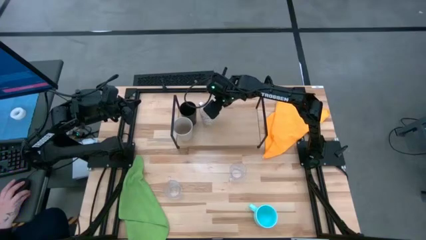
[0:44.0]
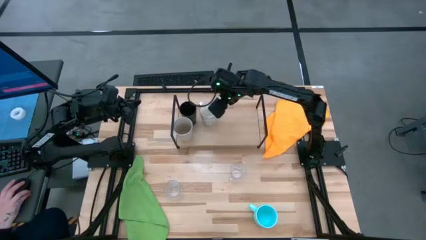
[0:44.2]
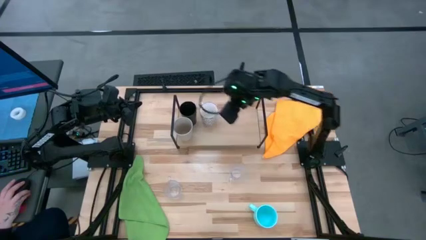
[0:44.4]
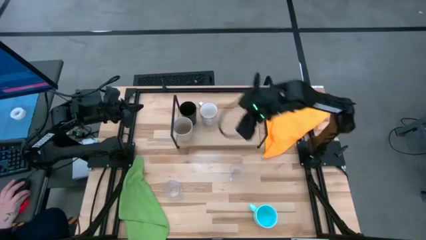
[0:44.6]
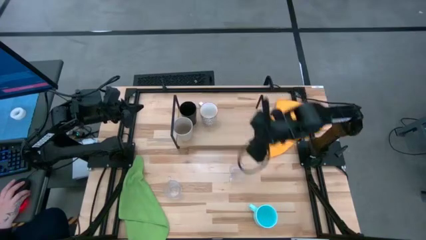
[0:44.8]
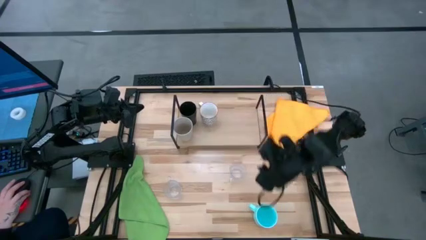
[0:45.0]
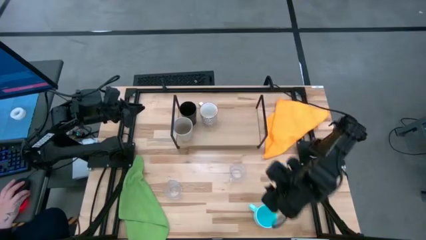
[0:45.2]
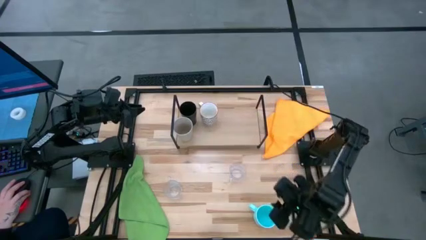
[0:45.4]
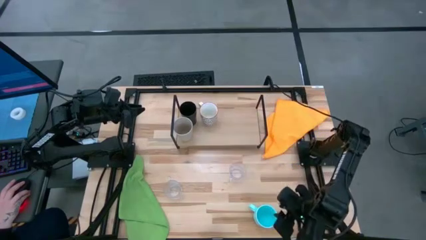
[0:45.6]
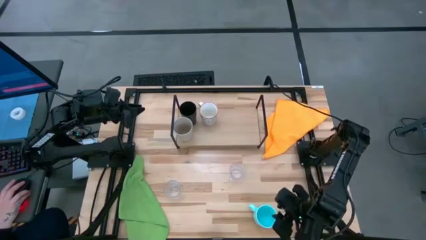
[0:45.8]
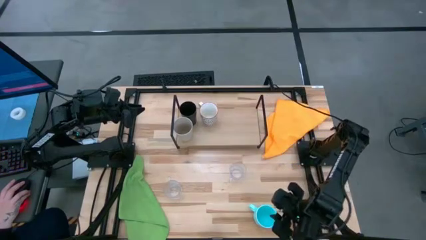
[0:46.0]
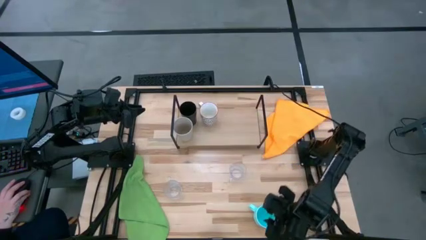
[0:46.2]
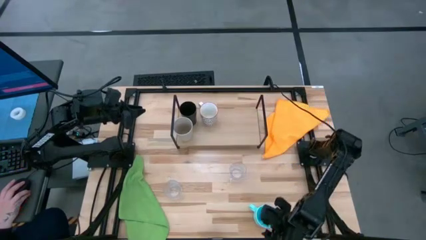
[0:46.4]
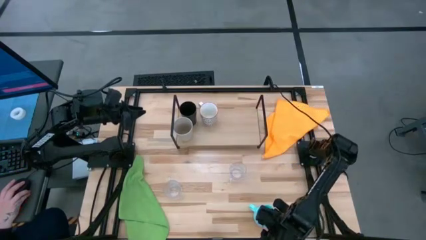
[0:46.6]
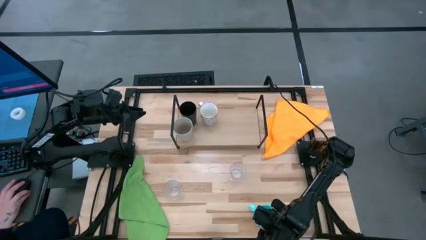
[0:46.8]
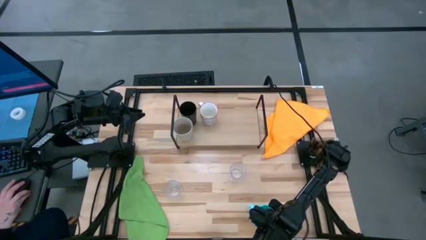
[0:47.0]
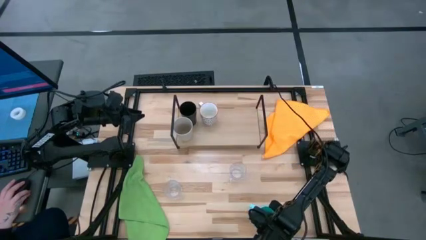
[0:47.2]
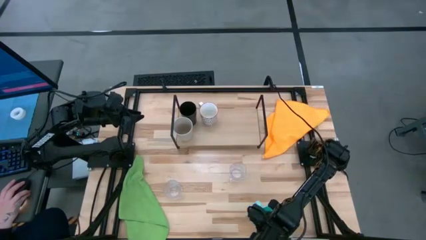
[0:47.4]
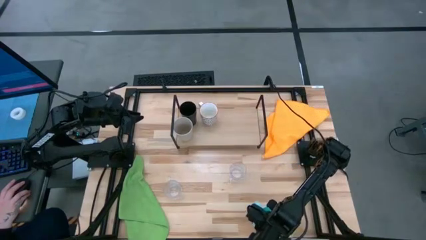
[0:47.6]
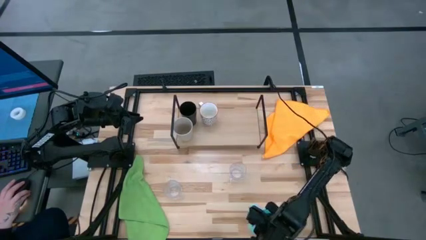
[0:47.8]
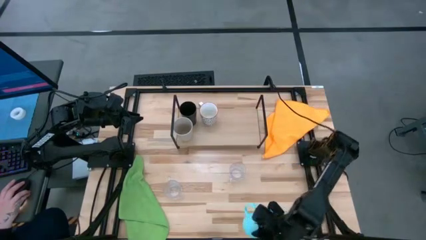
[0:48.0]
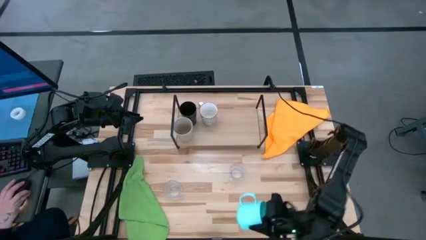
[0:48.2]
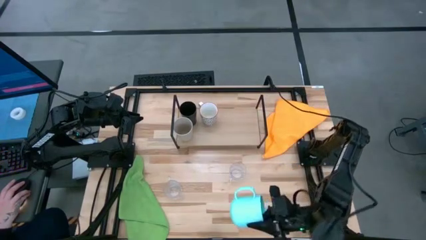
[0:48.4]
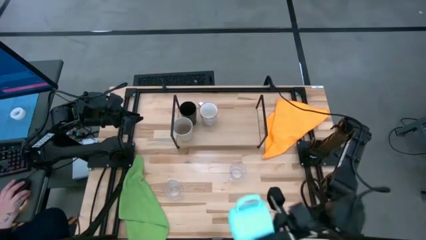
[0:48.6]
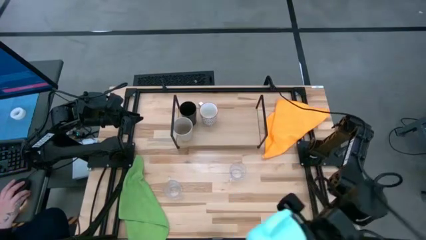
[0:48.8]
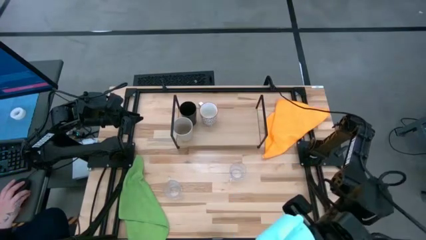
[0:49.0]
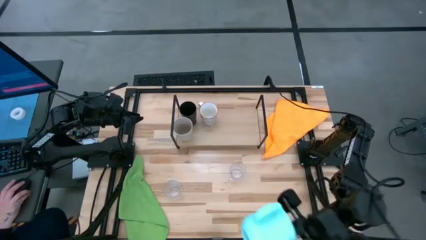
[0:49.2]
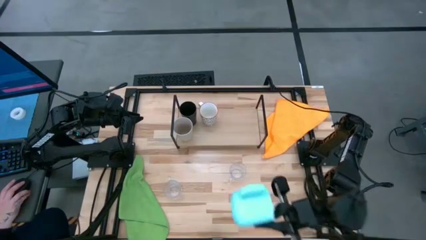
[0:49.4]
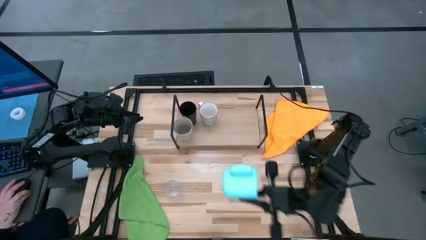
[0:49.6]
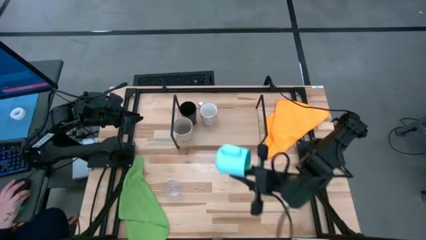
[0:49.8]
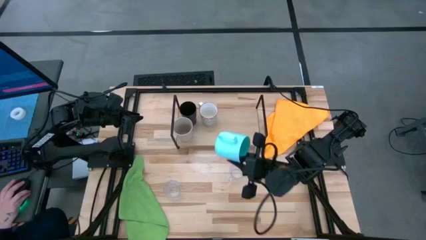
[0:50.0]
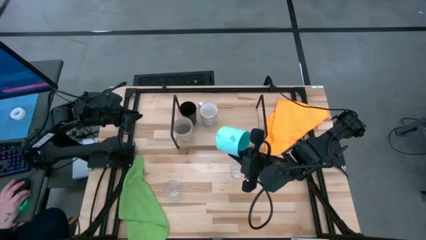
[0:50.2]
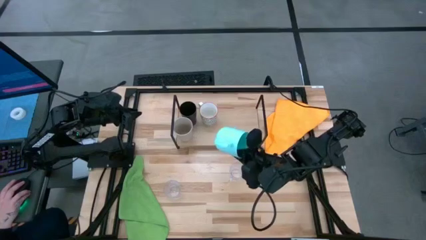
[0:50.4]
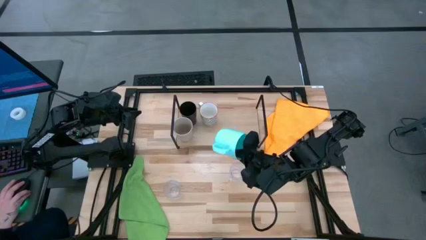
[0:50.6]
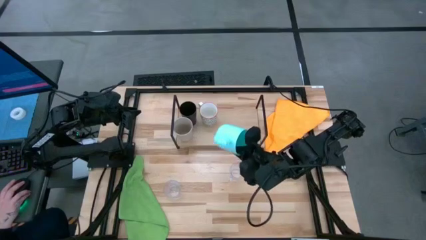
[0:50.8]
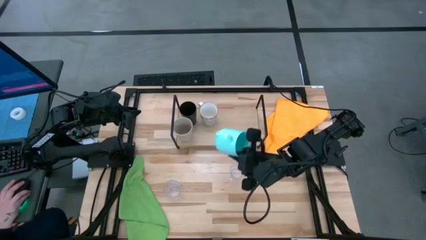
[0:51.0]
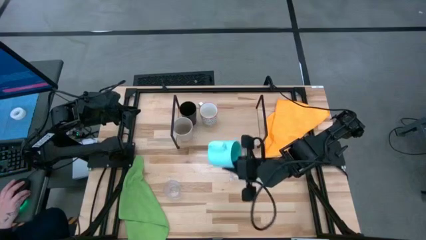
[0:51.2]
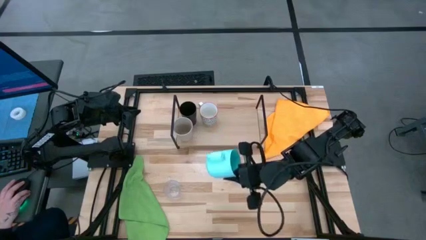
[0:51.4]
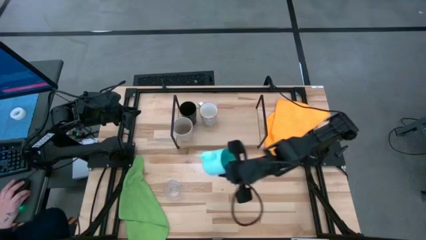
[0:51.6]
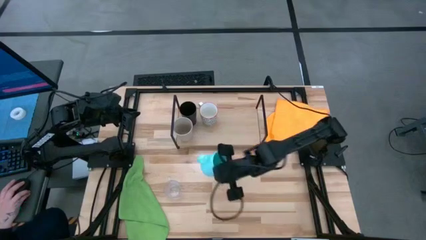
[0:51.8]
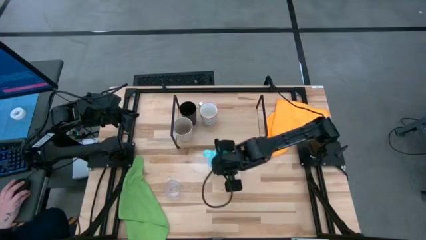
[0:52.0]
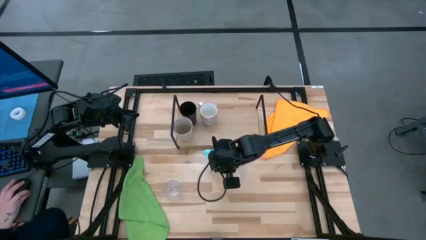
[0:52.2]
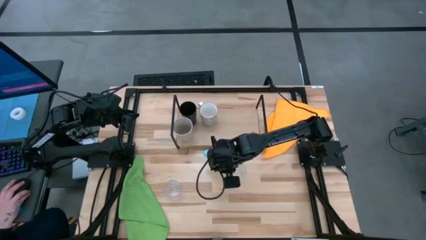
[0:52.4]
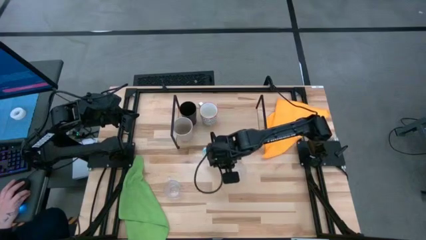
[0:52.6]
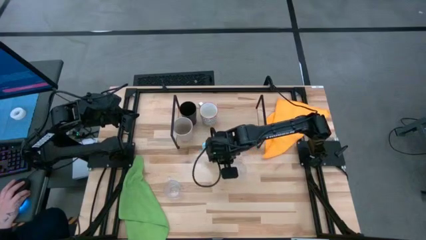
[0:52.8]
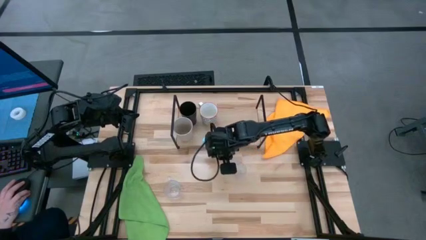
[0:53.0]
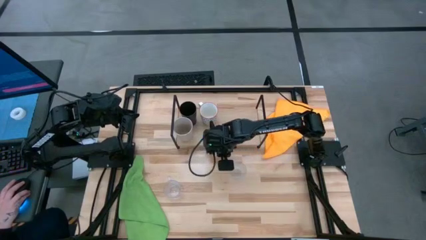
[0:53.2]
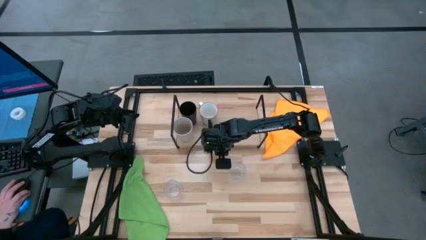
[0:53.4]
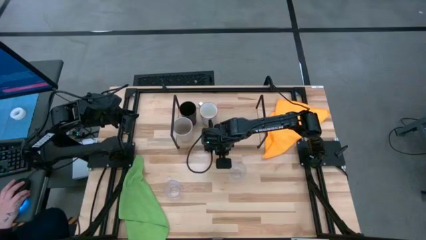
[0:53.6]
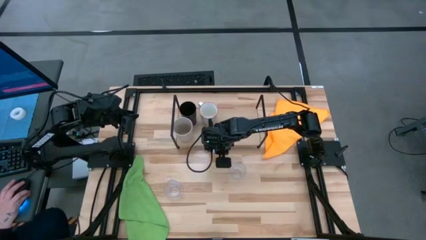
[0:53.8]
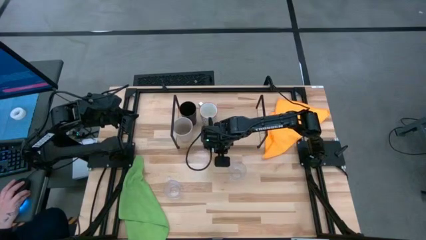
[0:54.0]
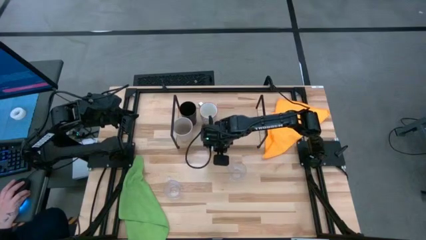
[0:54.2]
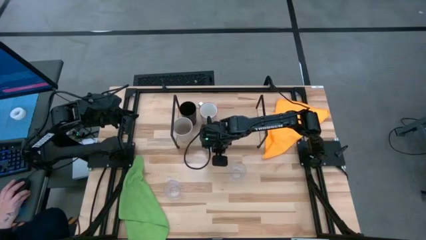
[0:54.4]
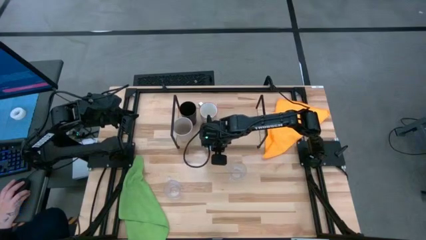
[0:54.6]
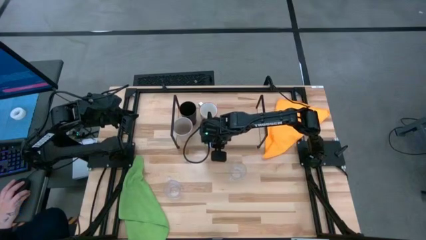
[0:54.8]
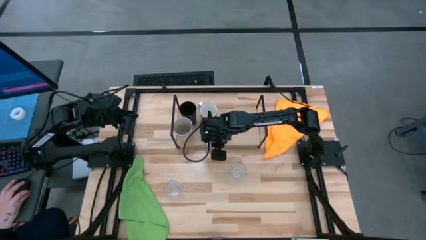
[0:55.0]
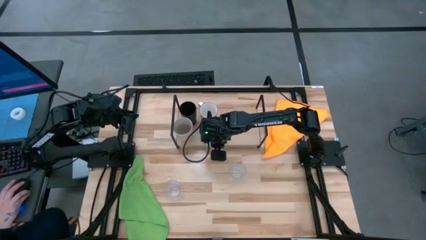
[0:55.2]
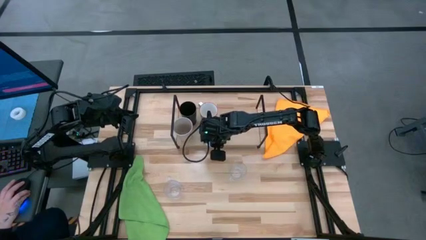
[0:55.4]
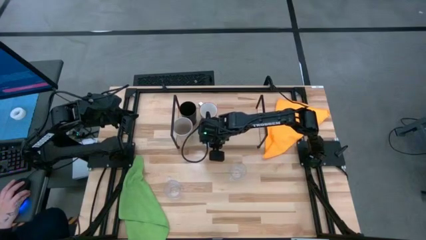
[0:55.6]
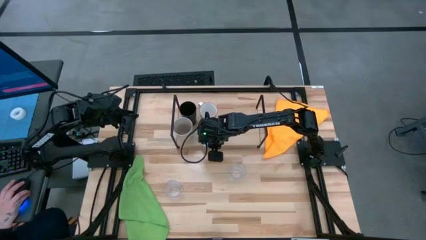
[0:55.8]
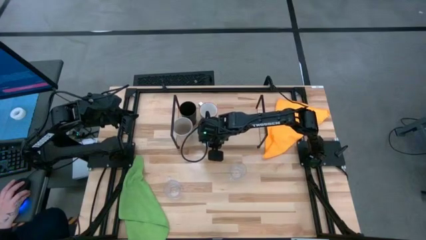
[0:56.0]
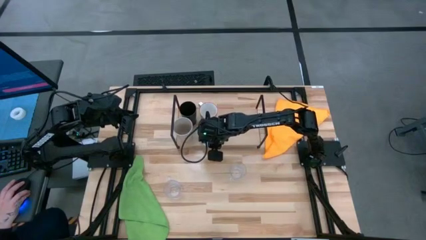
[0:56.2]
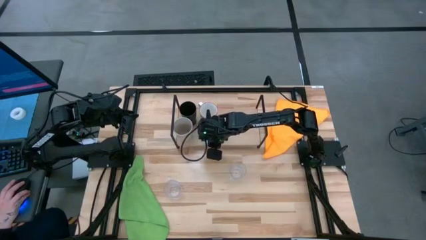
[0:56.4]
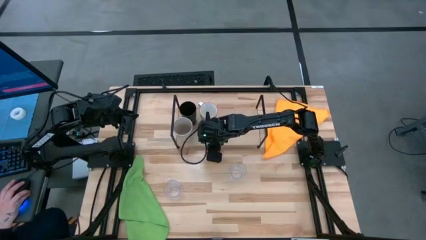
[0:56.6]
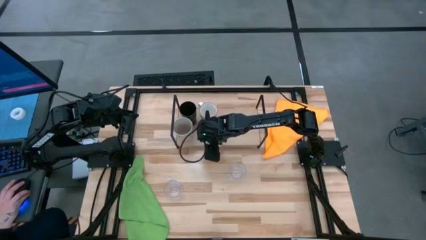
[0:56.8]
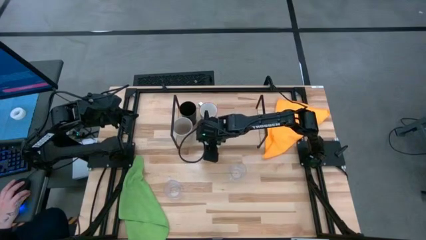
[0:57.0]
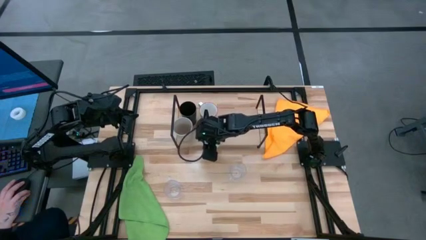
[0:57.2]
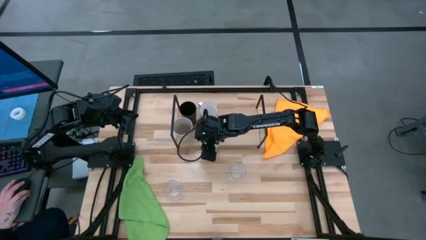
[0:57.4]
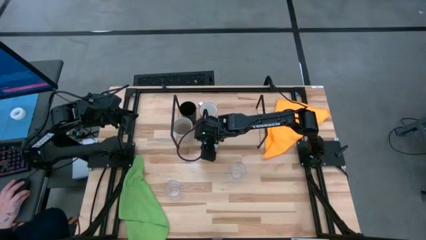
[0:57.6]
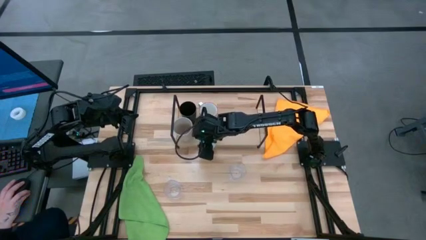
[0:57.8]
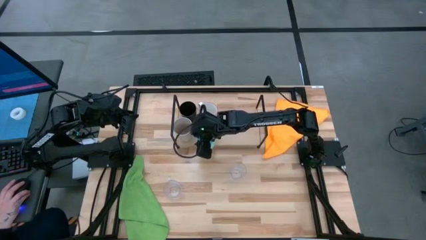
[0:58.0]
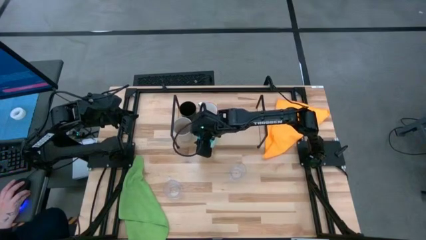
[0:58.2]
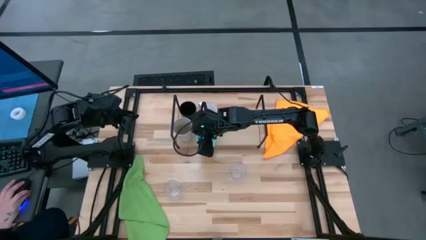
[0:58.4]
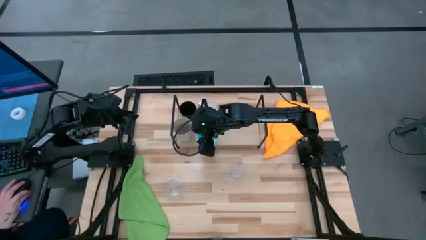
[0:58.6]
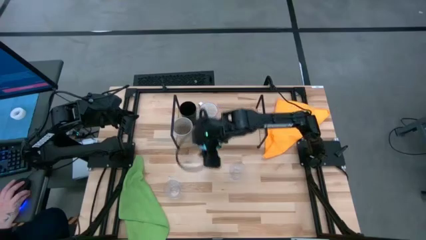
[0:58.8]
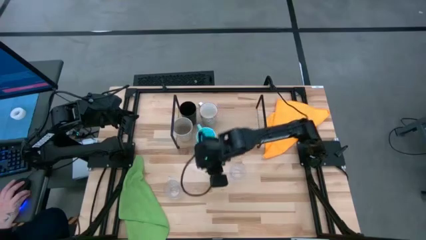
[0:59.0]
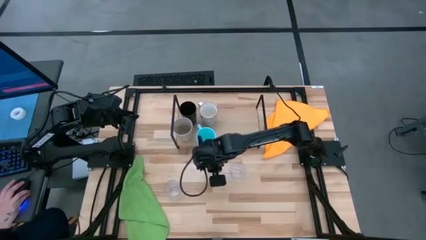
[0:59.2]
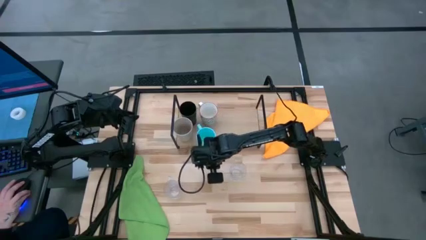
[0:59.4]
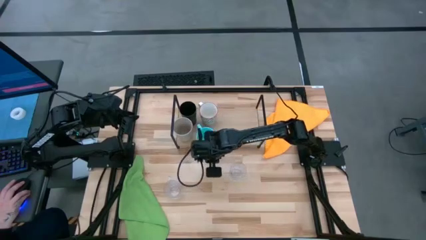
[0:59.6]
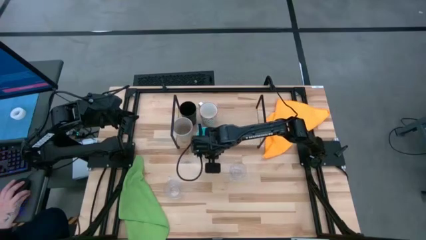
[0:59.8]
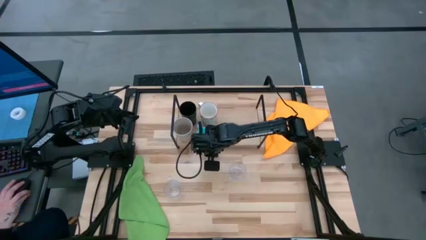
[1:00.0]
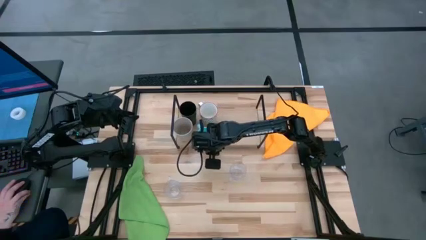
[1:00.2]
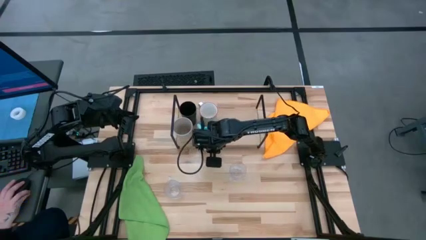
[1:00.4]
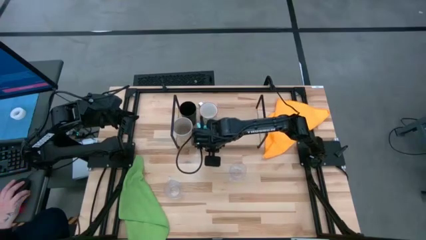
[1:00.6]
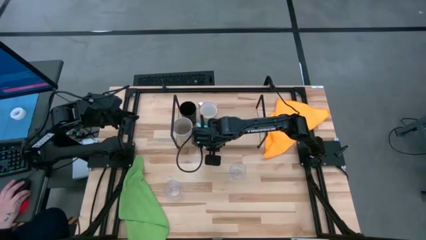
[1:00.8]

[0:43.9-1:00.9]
Task: Stack small to large cups/mugs on shelf
Put the blue mug on the shelf
